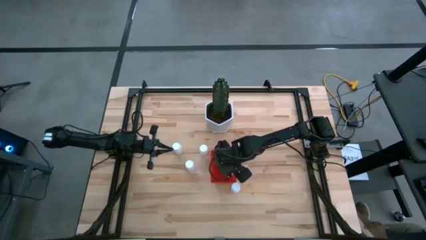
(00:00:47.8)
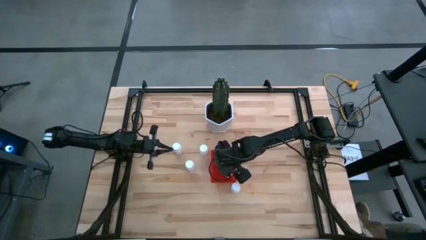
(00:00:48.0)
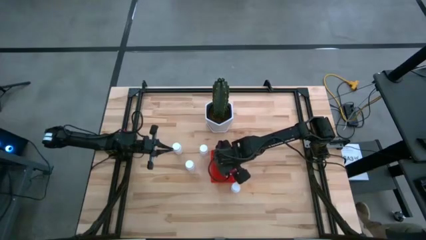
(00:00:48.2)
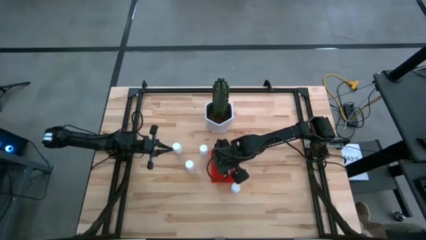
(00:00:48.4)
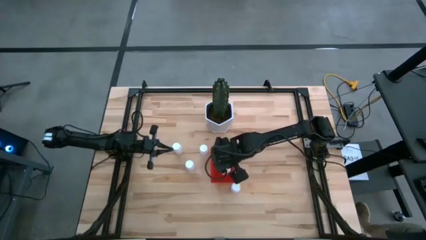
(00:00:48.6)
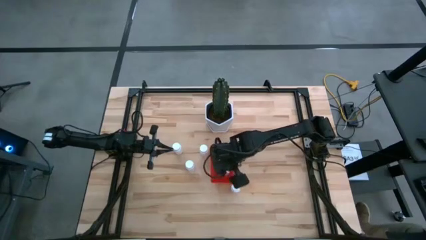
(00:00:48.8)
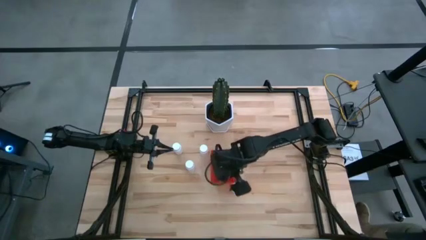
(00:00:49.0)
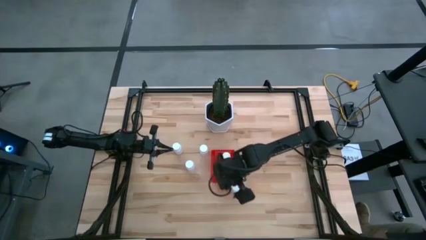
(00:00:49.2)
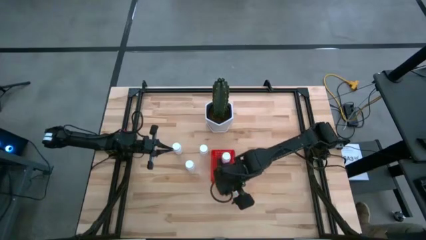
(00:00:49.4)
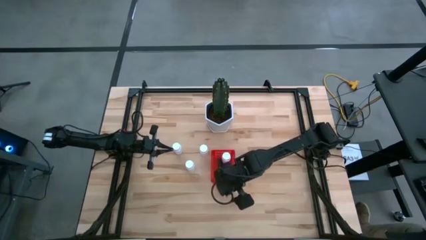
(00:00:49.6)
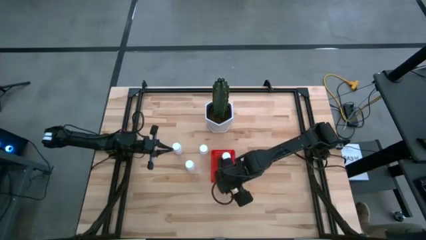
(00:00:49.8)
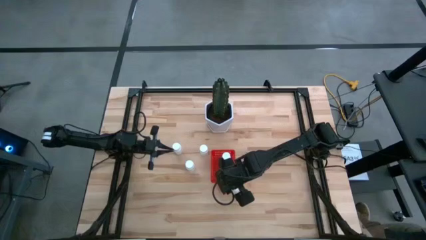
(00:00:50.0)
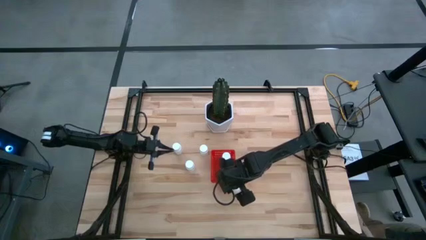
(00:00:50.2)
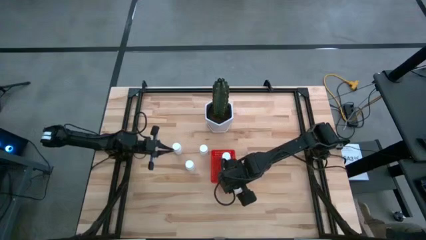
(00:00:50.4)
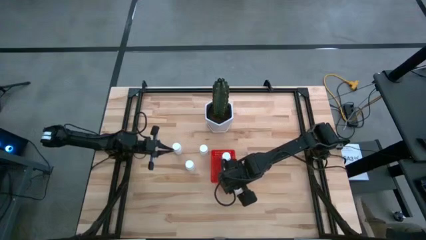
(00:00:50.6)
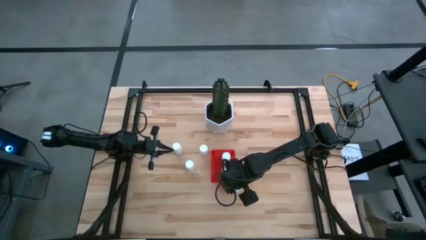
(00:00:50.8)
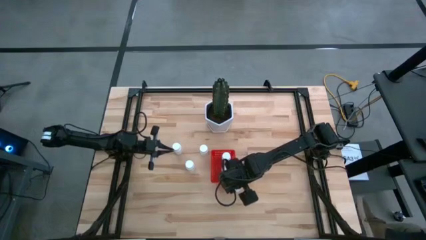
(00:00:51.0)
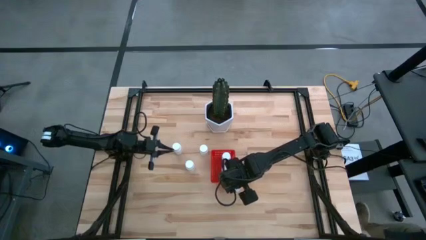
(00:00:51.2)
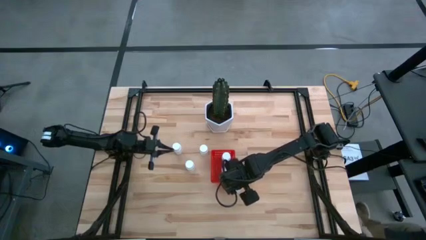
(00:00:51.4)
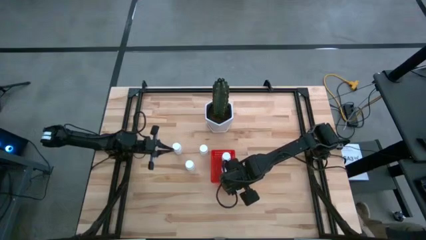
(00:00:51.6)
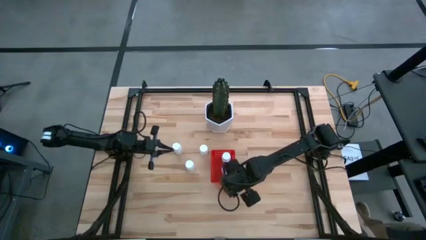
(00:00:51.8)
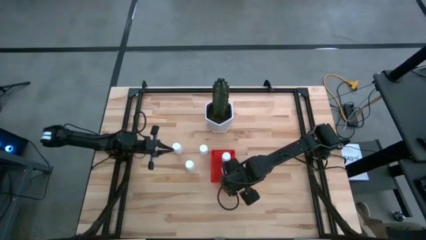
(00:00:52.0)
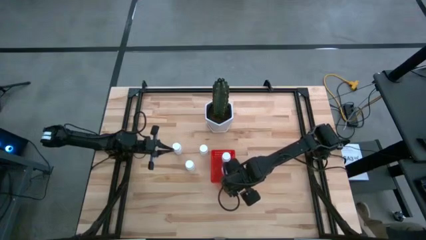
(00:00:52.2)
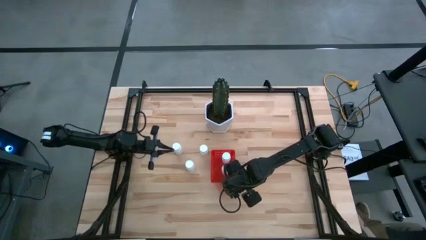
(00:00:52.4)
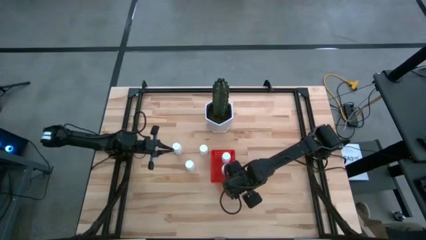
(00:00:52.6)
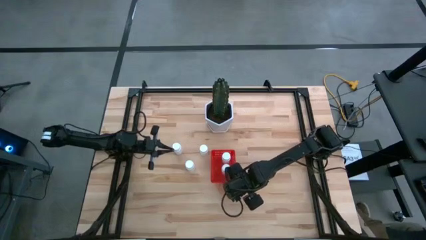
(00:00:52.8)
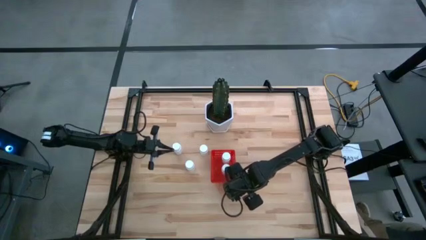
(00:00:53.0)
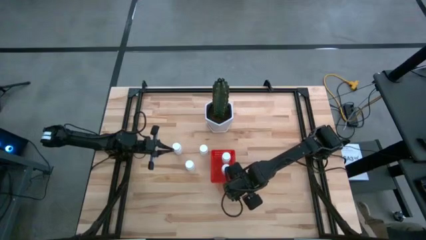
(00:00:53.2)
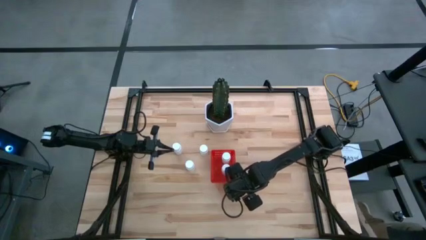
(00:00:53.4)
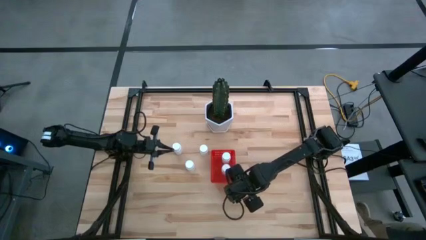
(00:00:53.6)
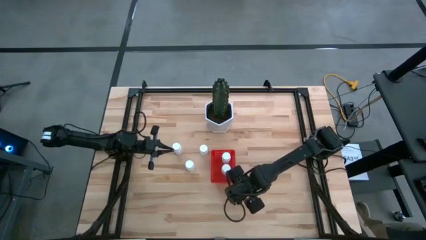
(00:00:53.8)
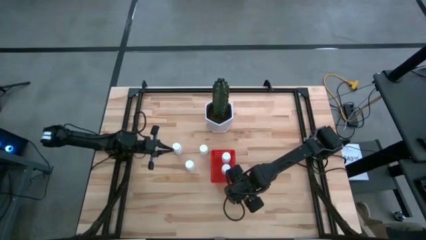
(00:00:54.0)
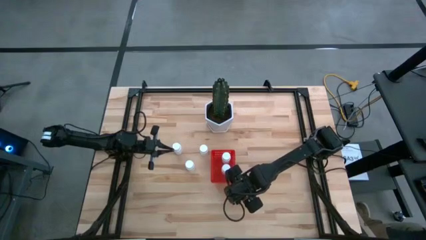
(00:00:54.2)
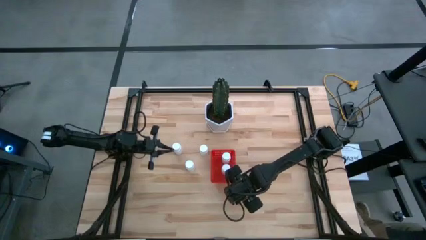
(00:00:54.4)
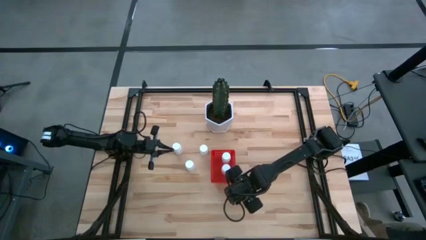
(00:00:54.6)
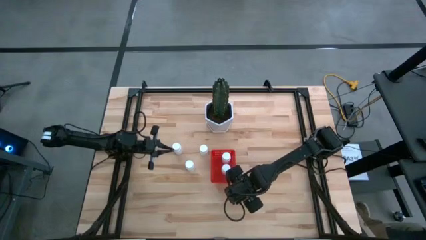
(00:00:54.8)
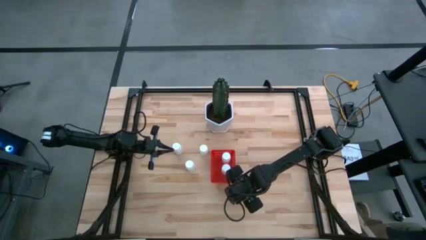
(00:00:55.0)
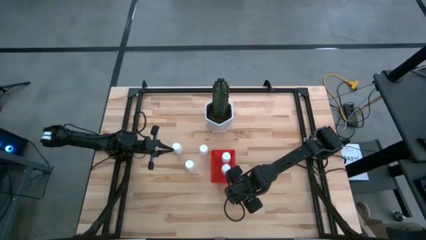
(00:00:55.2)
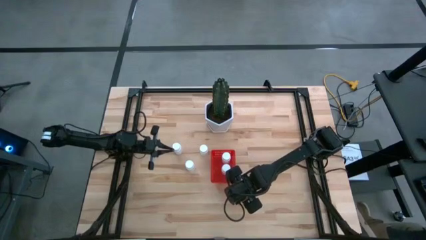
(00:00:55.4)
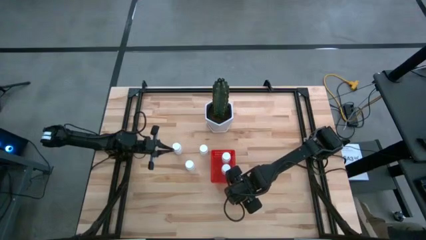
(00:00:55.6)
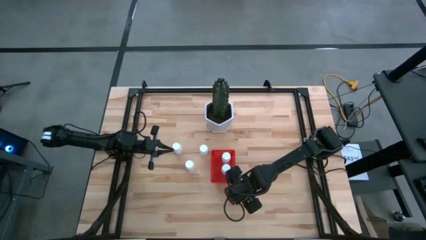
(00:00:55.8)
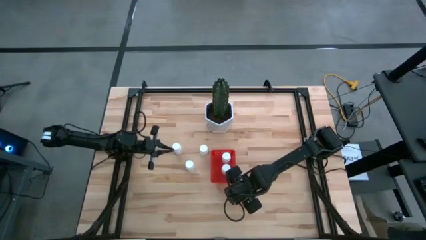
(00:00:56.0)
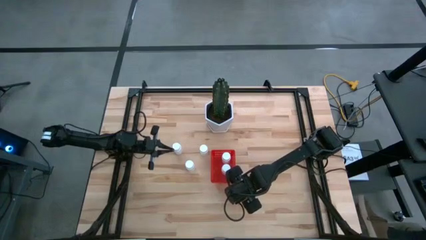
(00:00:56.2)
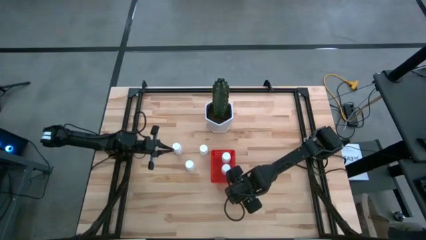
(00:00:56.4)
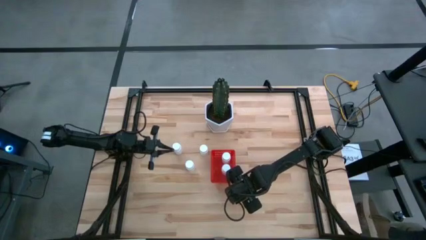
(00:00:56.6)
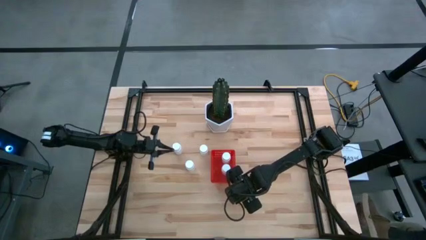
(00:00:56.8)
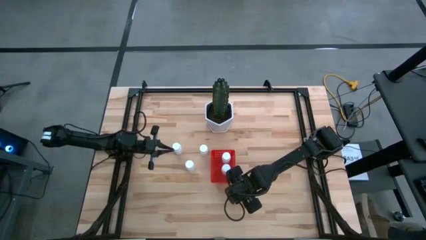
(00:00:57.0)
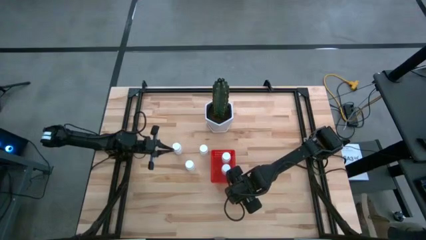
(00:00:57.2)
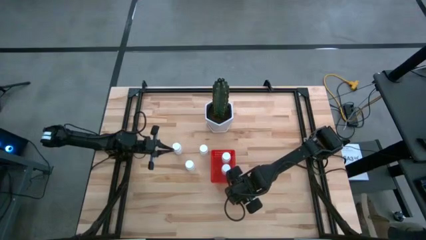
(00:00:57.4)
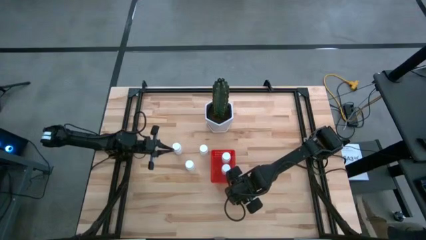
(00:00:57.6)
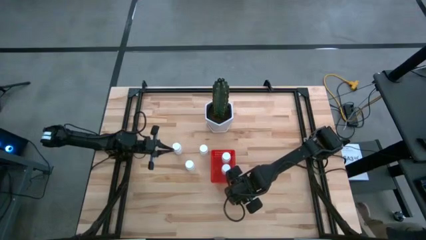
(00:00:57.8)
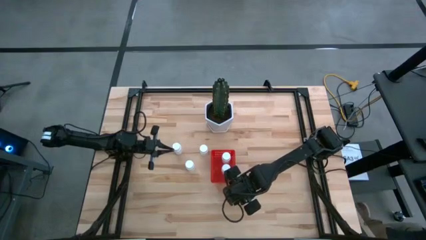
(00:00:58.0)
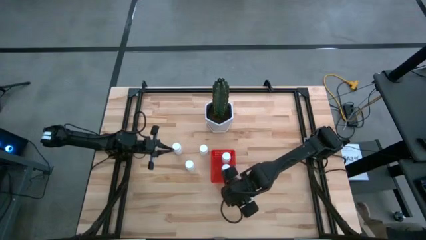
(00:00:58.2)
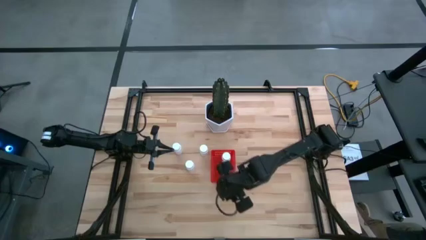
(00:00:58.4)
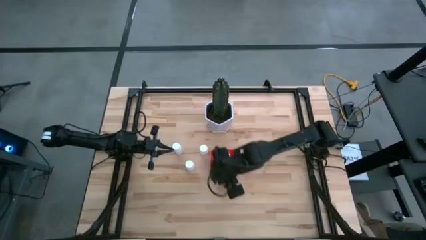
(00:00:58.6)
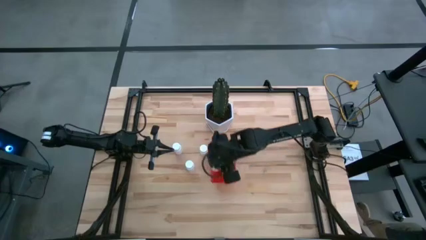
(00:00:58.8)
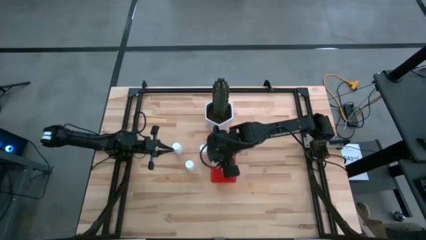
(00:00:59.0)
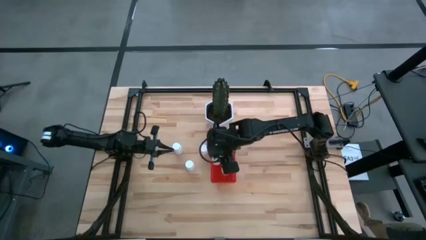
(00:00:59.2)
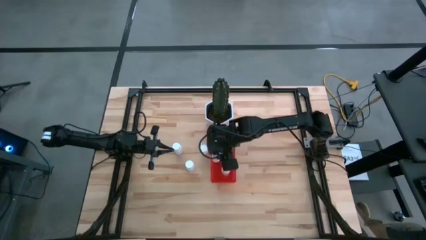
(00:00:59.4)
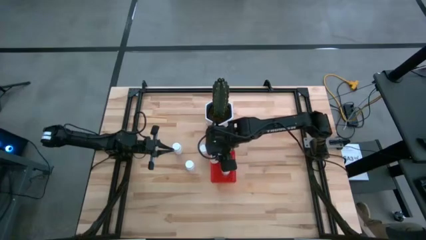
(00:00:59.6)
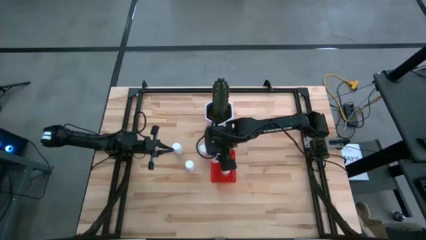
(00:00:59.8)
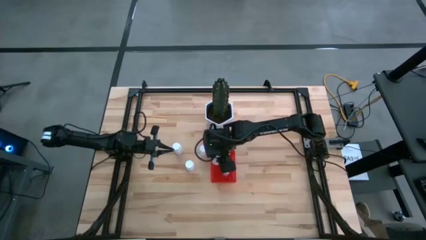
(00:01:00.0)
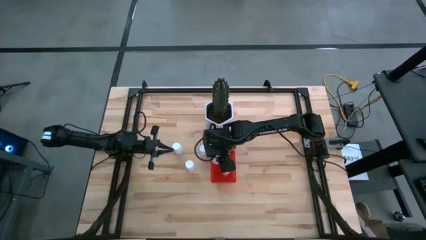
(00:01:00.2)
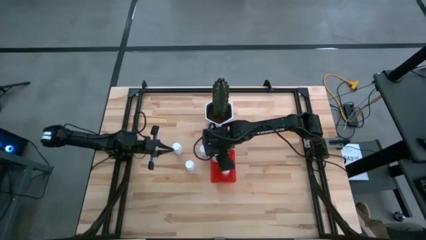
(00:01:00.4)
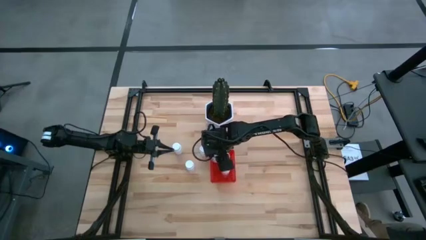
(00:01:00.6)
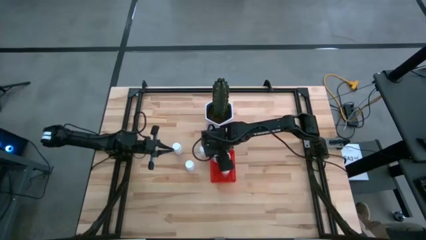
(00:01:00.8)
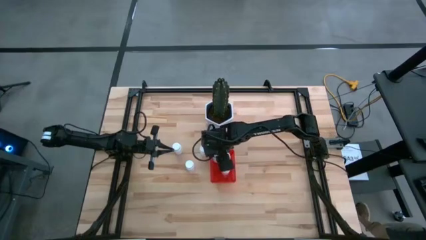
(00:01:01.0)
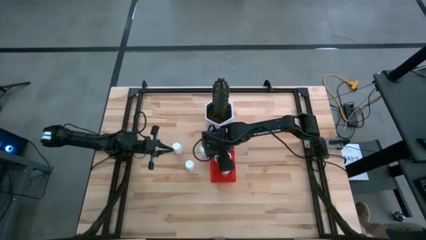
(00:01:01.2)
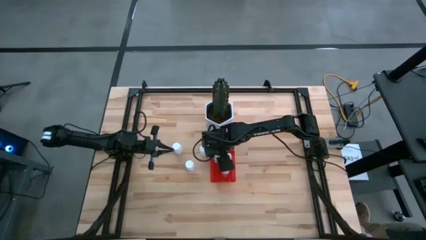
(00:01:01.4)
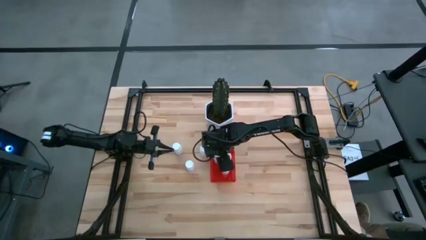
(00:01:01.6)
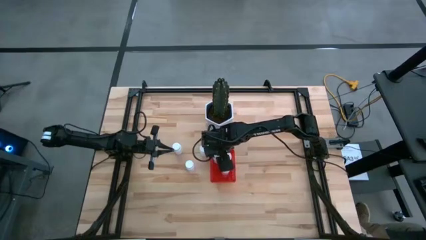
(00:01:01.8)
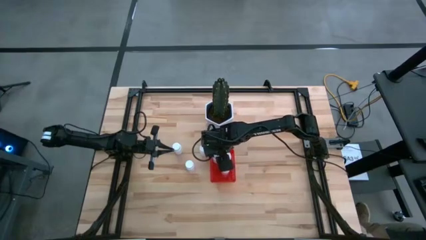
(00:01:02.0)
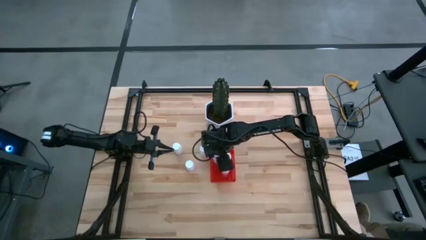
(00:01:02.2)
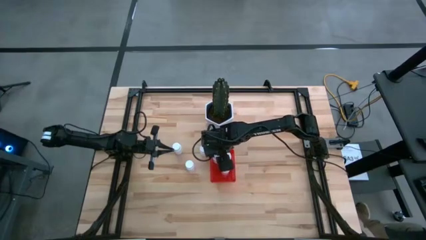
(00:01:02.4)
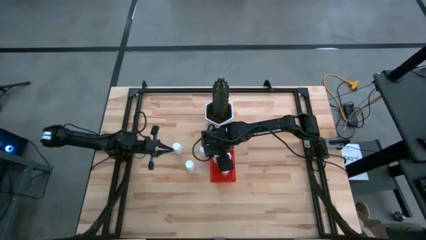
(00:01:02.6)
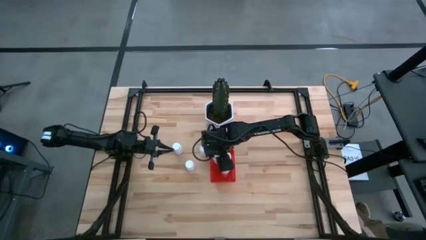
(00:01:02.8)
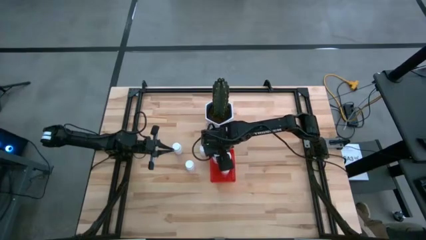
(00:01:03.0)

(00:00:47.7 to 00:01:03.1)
Task: Pick and place pill bottles into a basket
Put the white pill bottle into the red bin
